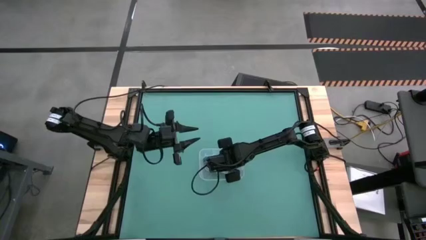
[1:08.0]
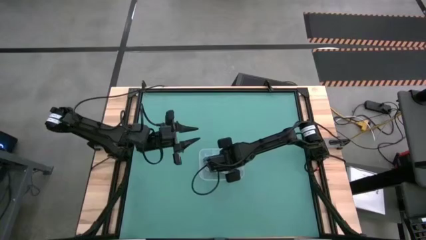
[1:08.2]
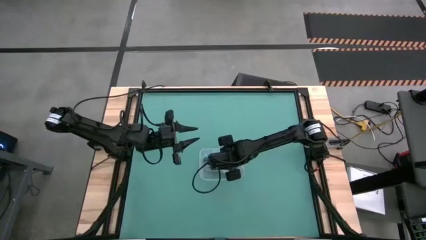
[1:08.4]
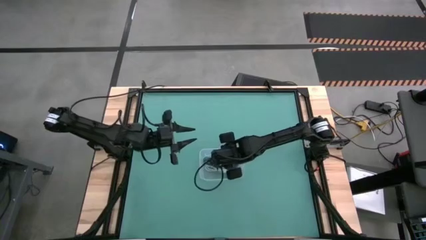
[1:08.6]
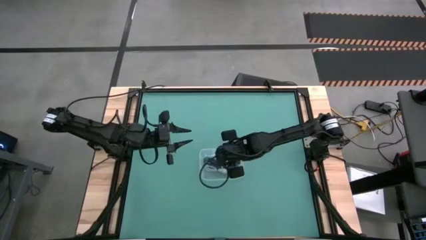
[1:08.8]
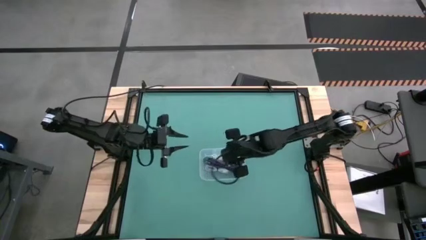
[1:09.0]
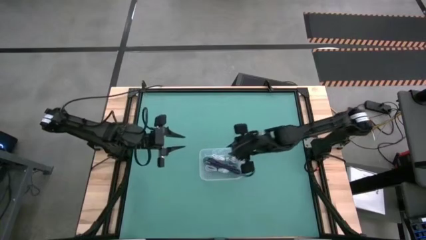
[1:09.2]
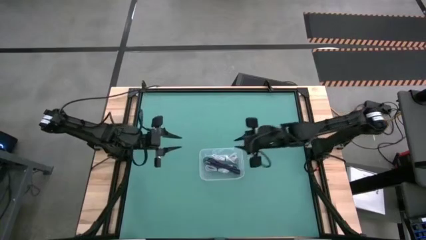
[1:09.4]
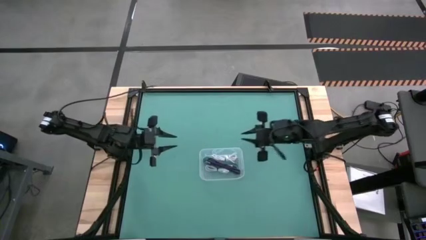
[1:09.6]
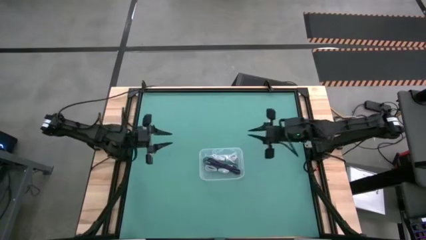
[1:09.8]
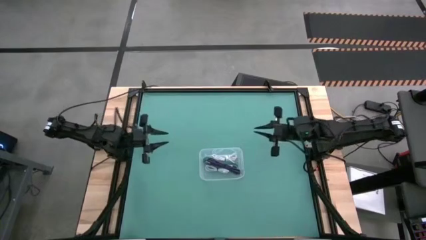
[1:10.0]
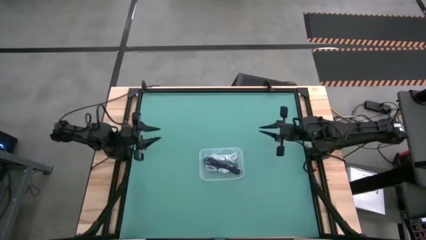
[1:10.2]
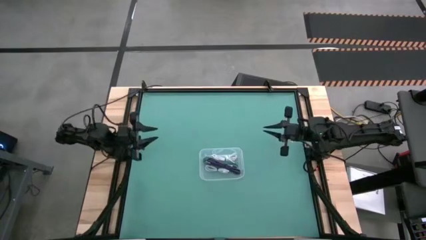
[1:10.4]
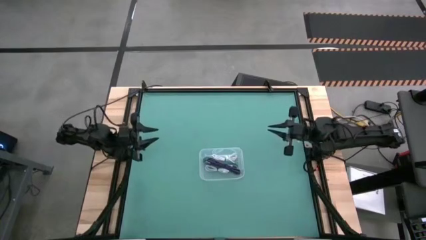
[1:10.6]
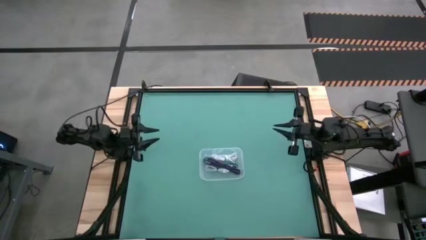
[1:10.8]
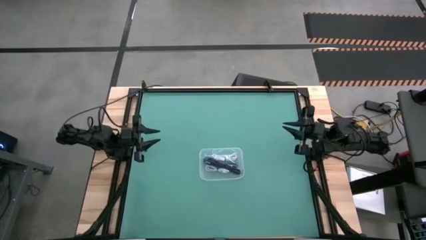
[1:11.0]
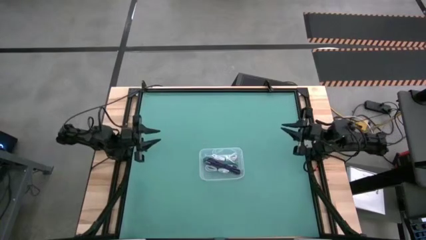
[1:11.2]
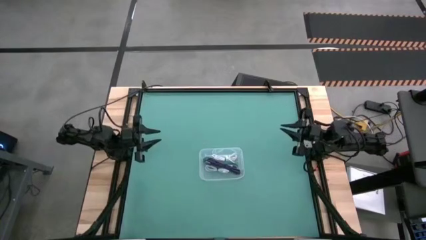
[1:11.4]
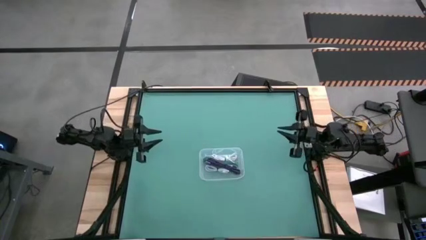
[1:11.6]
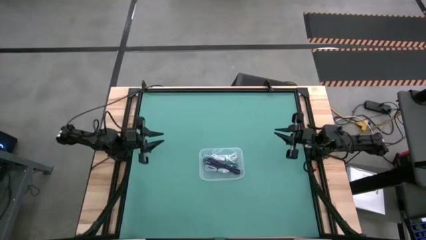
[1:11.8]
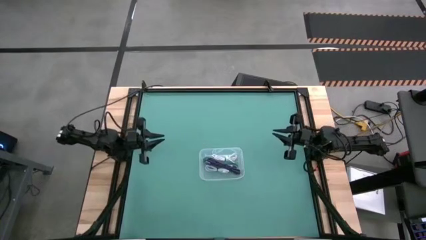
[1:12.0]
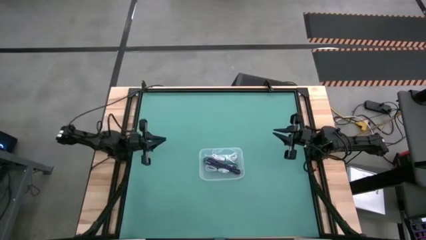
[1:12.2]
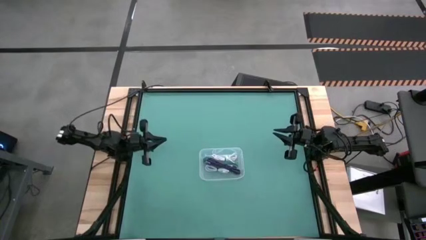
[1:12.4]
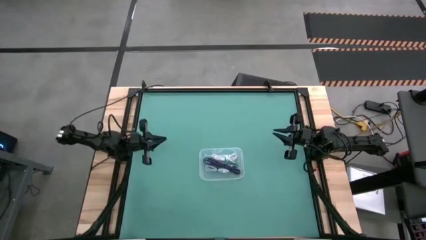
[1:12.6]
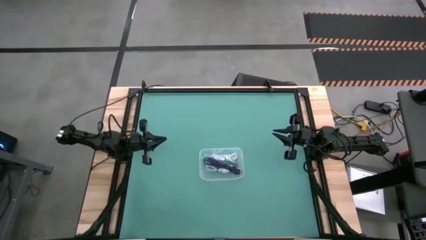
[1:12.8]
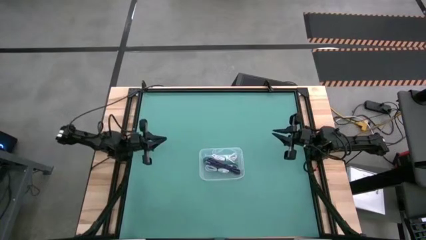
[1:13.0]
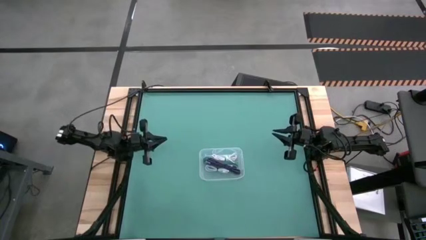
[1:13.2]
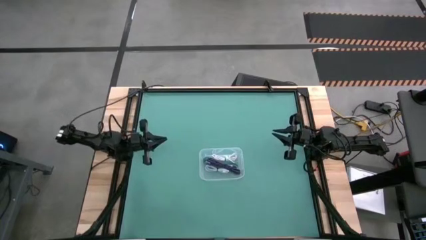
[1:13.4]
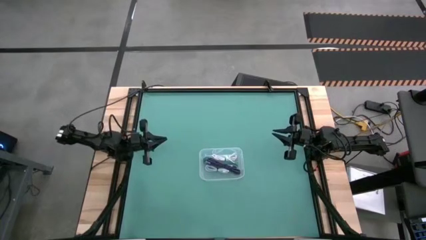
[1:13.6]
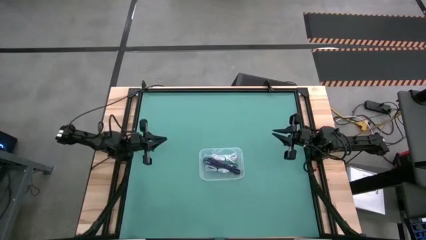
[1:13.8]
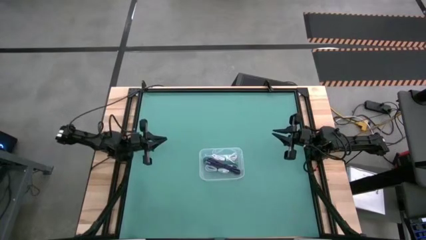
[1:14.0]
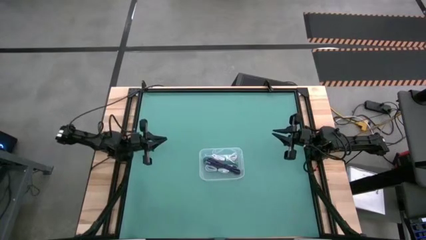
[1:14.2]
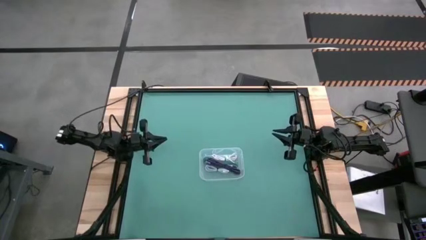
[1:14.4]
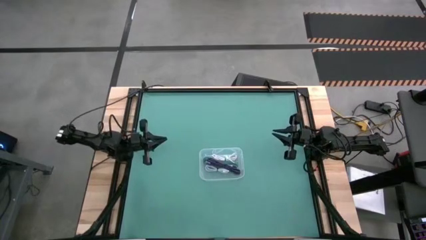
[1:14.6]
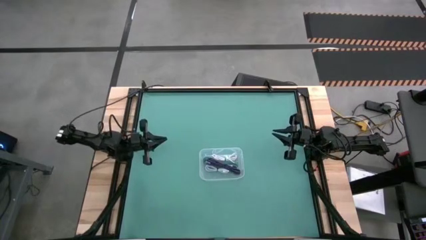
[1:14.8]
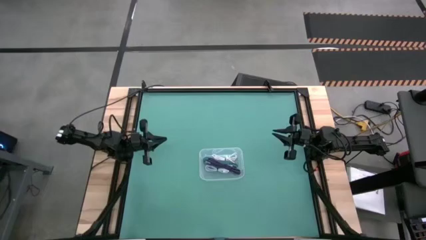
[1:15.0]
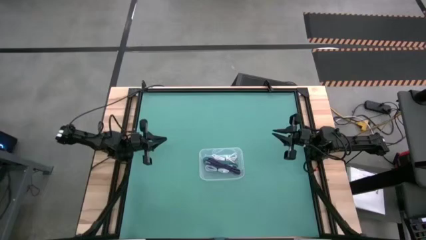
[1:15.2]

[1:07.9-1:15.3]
Task: Pick and place USB-C Cables
Return to Home Position

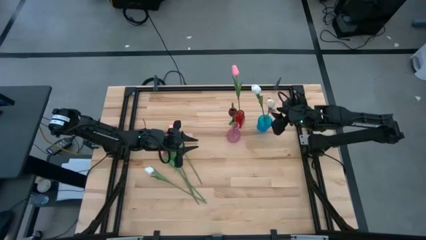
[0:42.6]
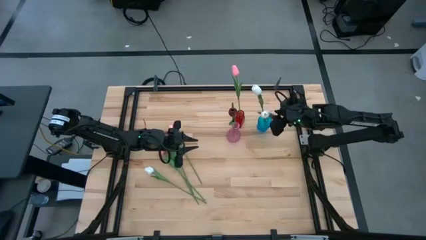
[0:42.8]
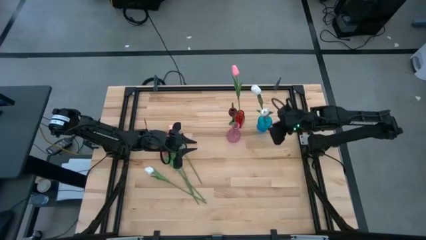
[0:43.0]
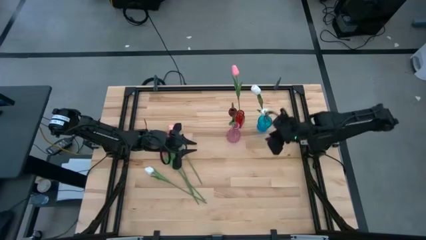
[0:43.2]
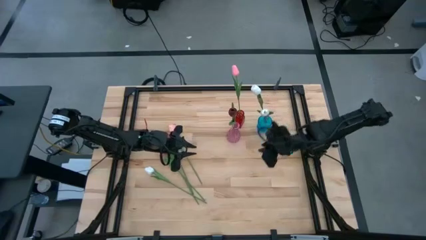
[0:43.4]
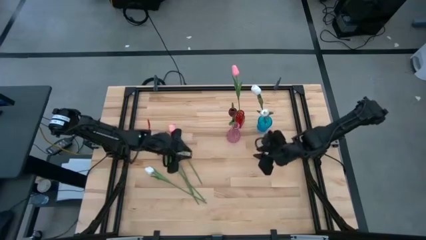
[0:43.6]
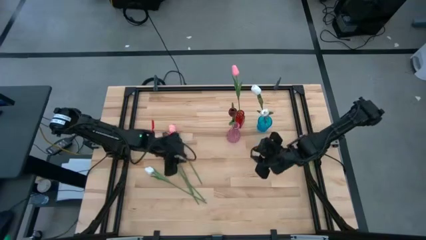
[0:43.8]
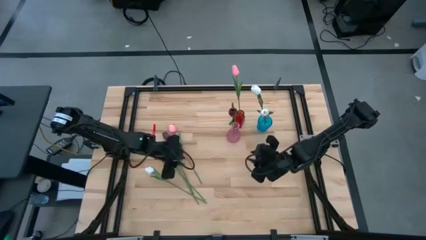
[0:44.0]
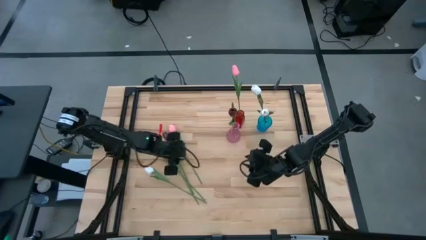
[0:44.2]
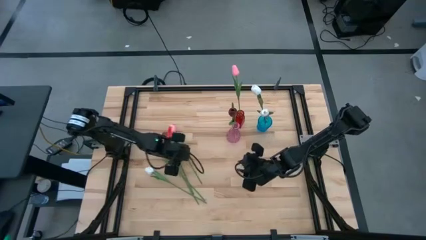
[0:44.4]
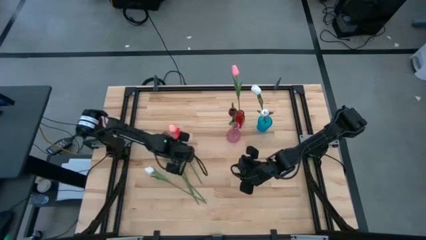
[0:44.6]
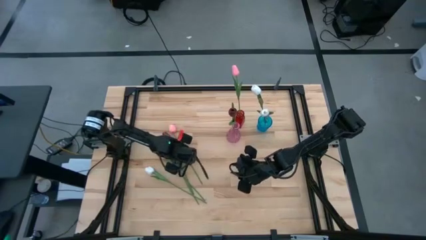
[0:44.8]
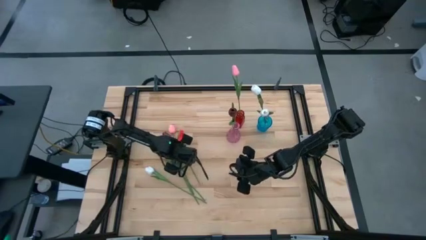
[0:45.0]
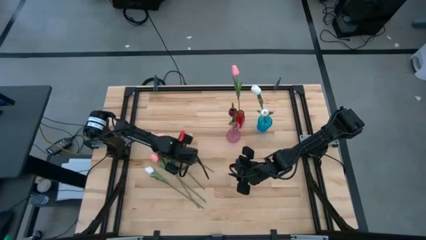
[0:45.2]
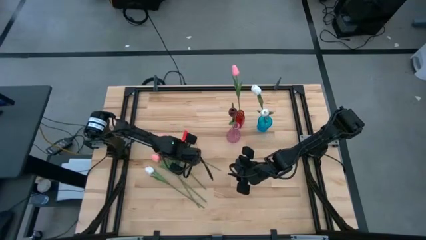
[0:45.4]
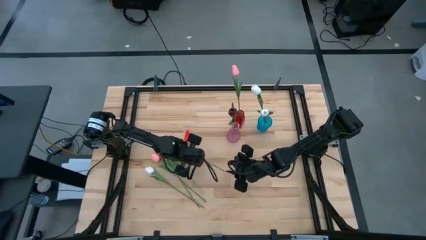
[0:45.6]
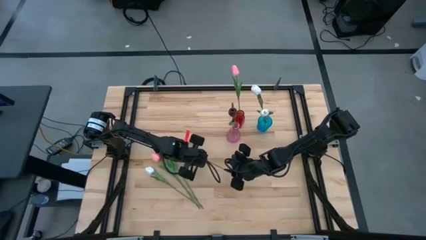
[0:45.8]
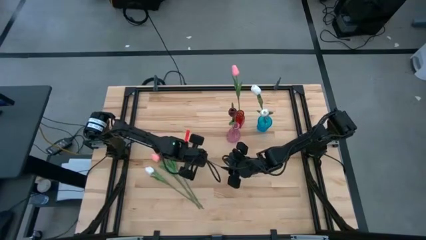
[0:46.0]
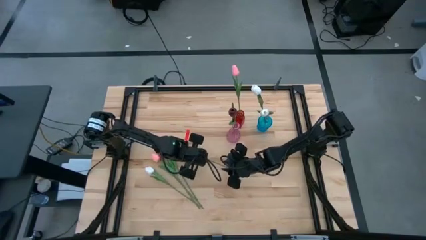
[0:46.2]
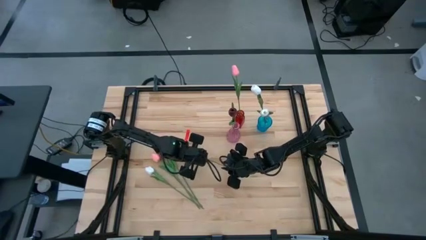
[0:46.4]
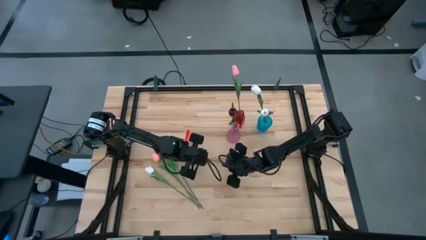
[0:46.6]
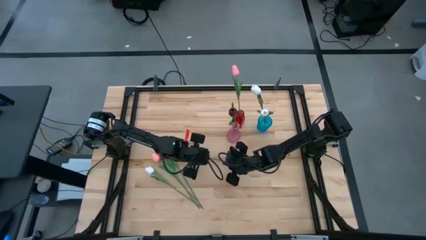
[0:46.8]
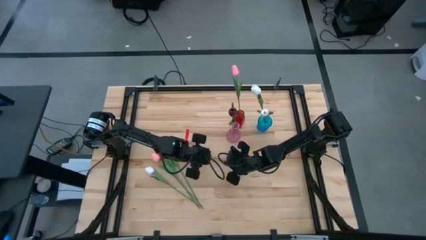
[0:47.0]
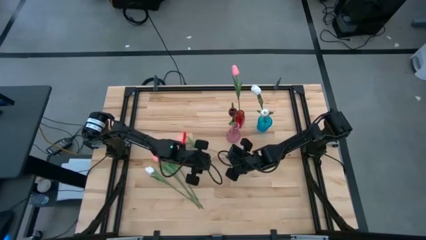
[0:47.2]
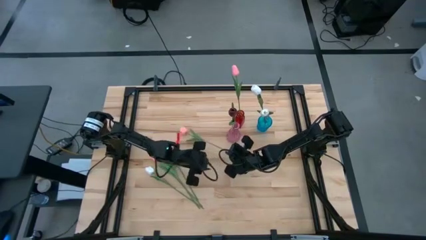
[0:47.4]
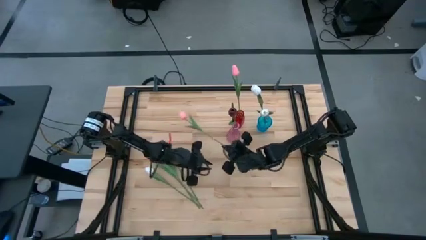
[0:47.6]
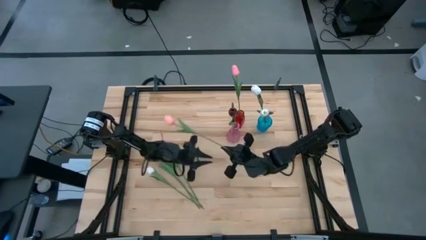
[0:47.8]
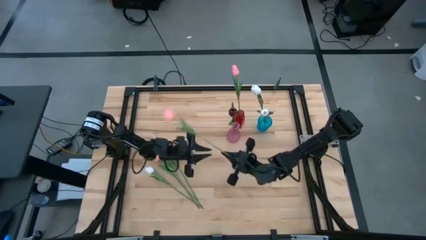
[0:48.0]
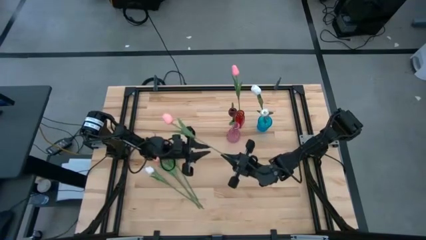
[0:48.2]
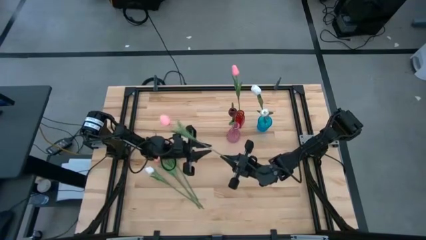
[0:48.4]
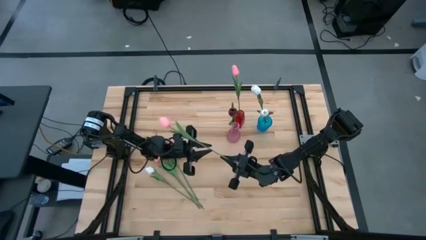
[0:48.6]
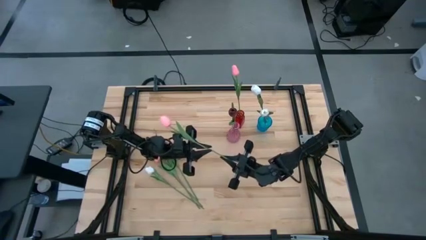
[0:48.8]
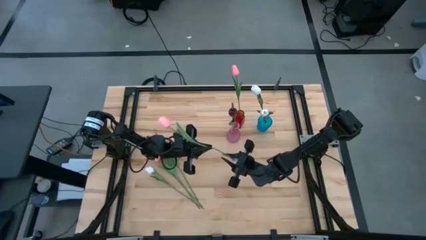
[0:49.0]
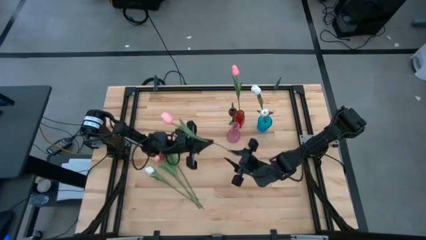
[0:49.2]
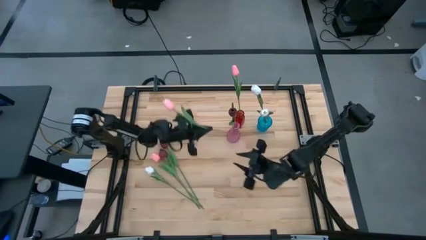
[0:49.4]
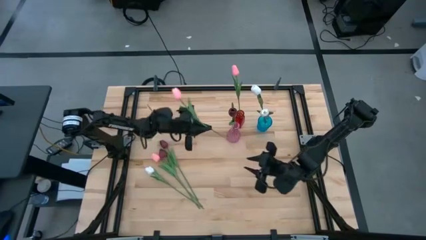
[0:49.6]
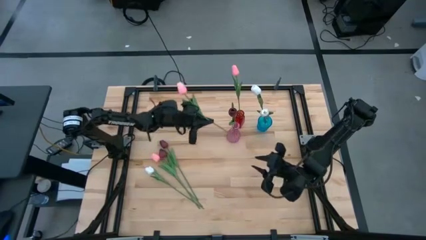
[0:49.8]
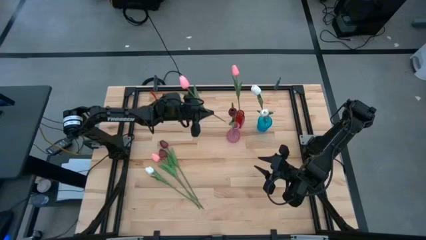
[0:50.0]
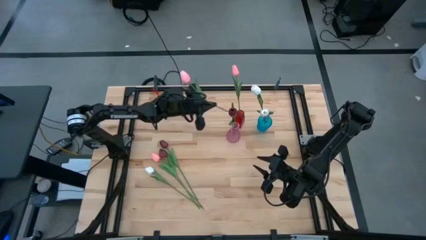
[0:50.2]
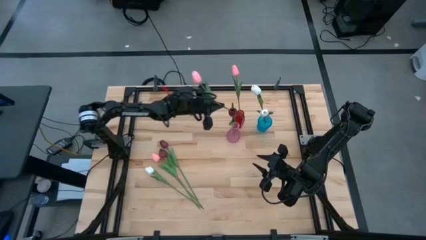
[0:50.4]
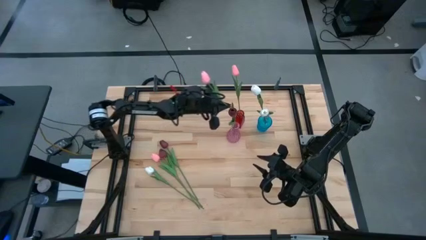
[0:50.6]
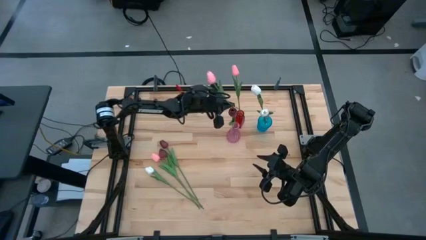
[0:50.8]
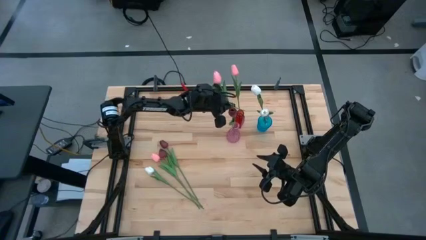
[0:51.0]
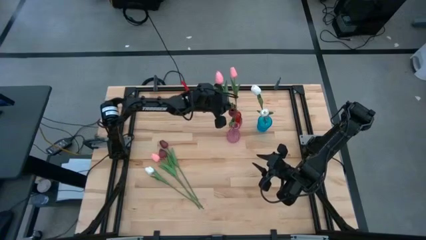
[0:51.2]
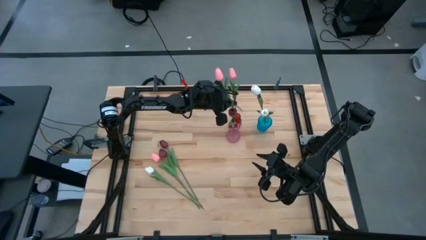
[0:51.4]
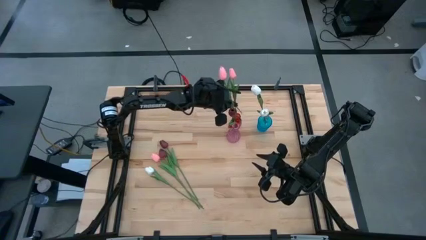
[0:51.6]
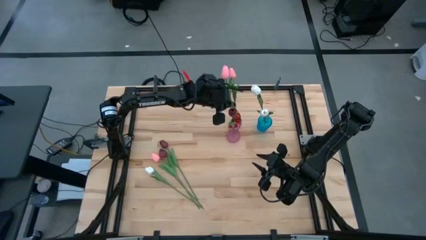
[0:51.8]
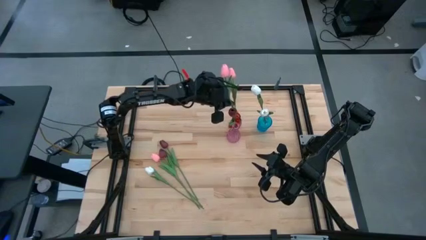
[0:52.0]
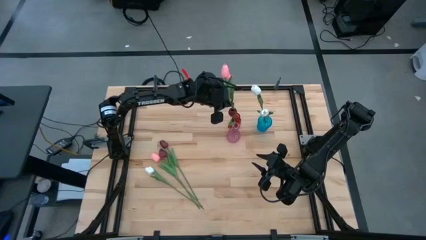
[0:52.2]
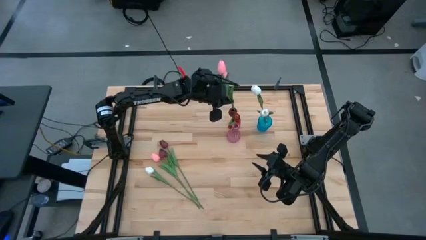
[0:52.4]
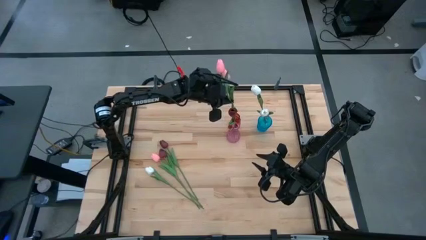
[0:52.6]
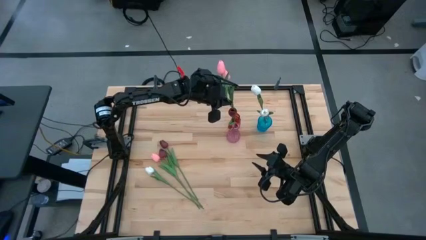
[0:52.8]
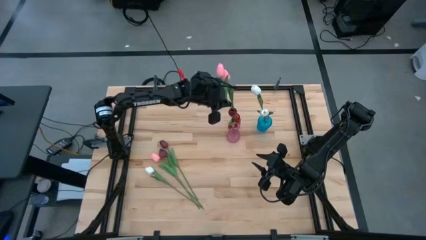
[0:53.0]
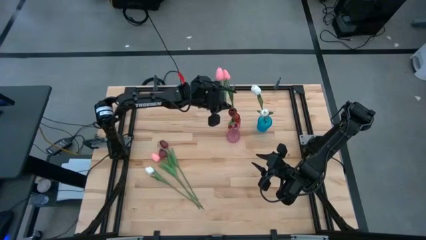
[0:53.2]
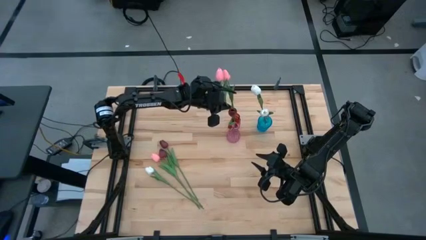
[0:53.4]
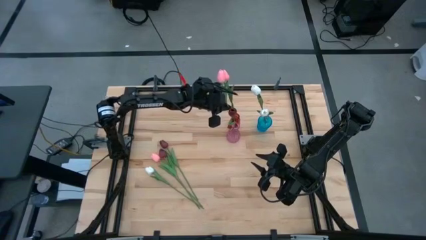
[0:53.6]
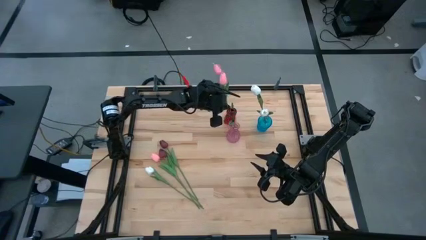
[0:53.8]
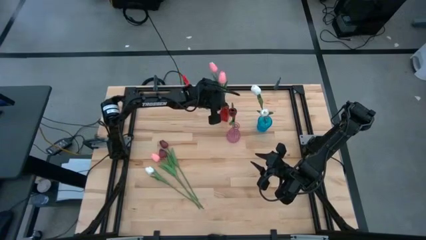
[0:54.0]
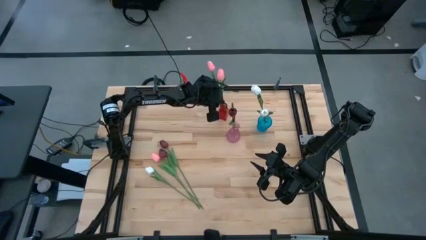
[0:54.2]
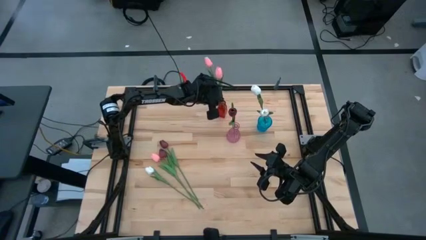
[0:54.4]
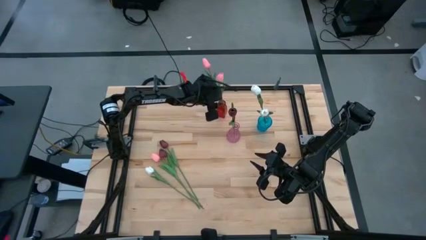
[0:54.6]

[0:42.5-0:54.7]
Task: Sort flowers into vase by color
Put the top pink flower into the red vase
